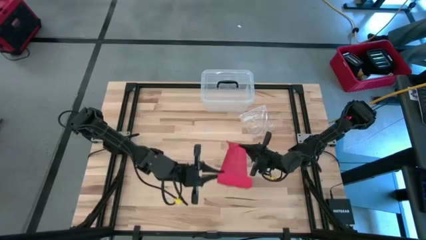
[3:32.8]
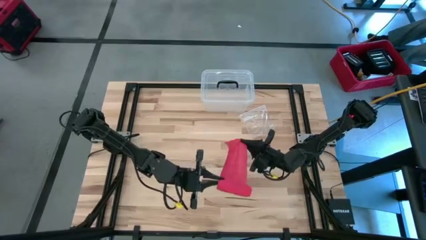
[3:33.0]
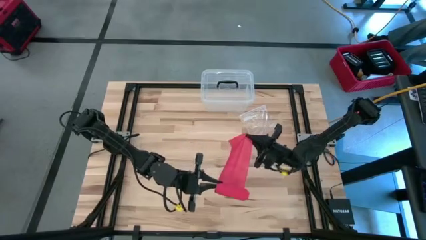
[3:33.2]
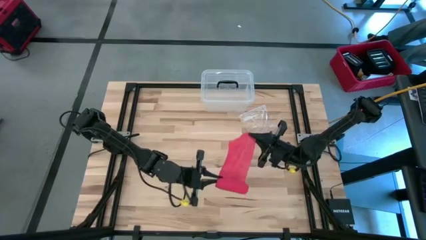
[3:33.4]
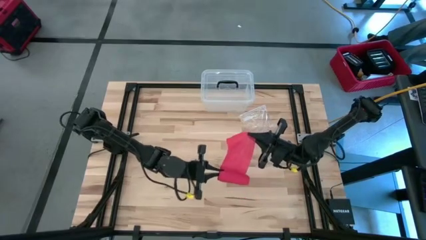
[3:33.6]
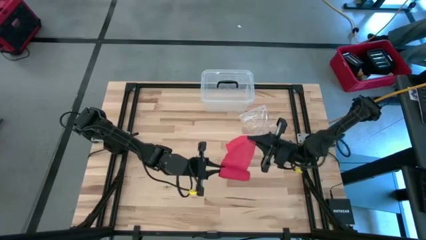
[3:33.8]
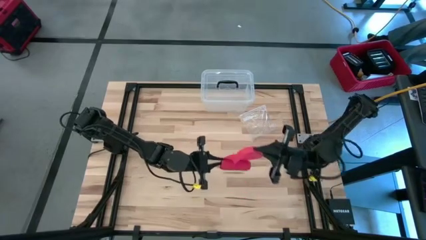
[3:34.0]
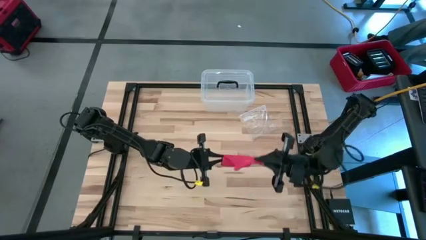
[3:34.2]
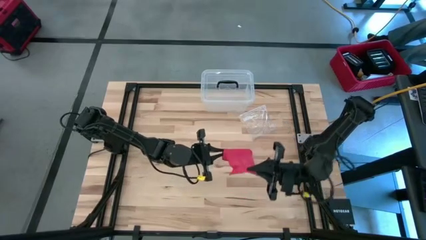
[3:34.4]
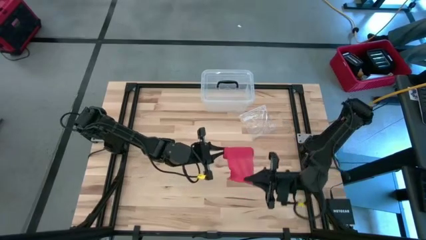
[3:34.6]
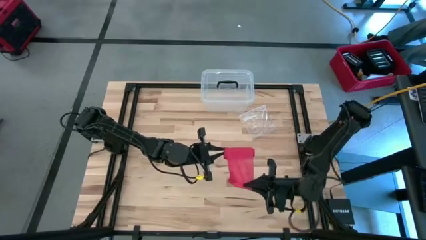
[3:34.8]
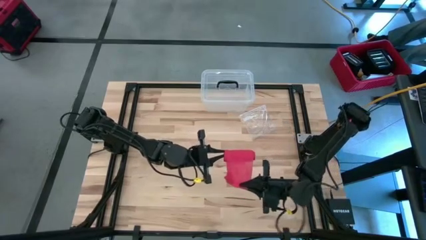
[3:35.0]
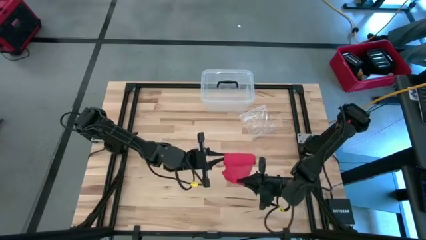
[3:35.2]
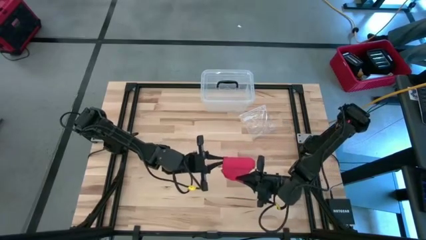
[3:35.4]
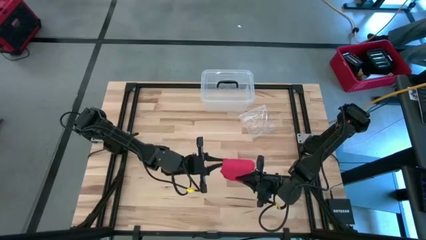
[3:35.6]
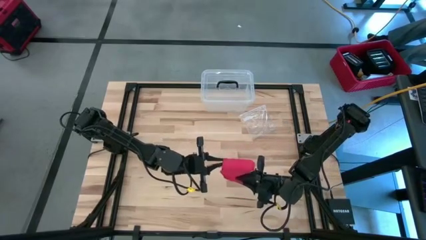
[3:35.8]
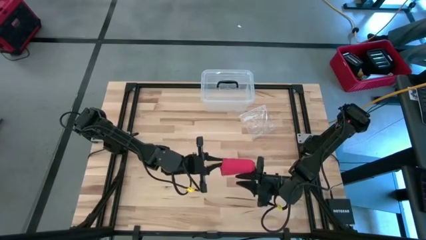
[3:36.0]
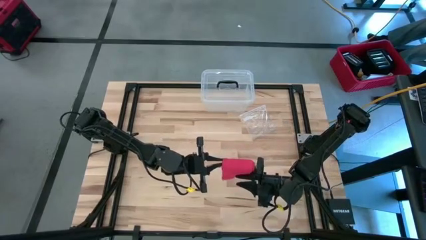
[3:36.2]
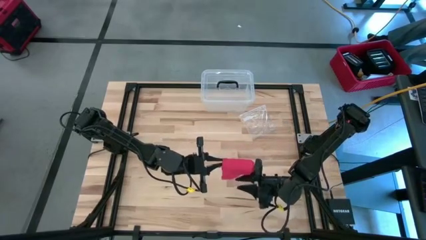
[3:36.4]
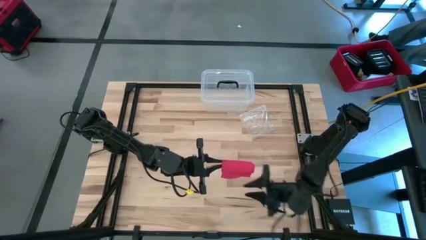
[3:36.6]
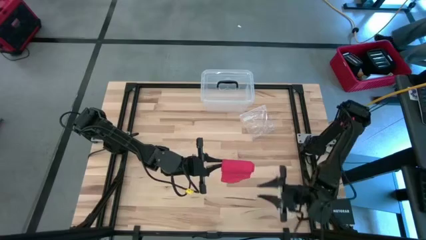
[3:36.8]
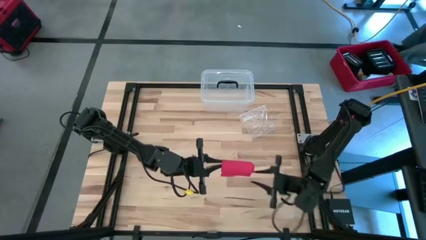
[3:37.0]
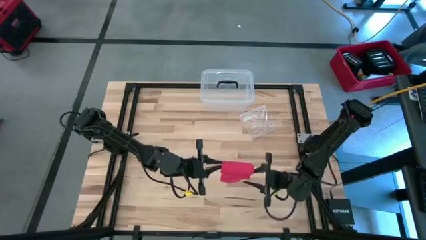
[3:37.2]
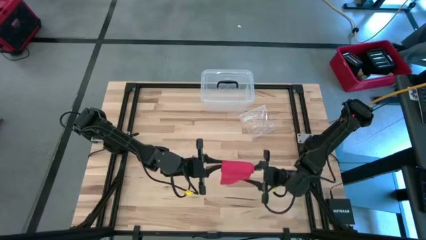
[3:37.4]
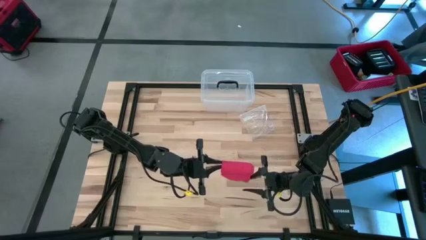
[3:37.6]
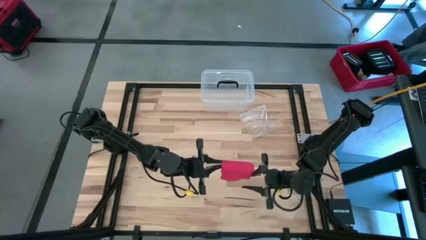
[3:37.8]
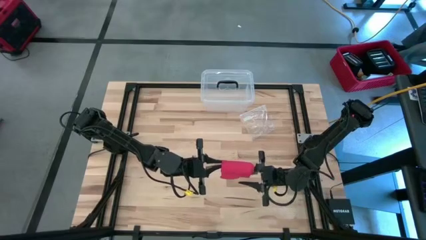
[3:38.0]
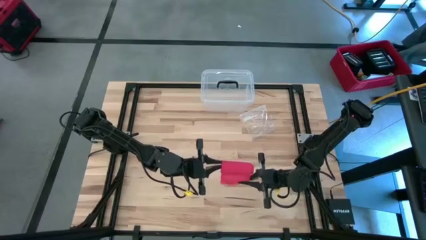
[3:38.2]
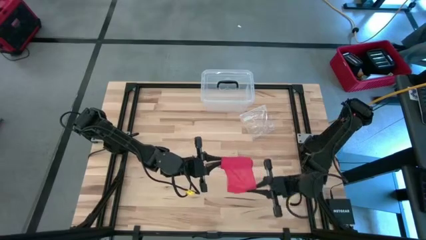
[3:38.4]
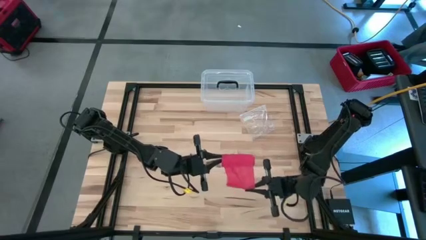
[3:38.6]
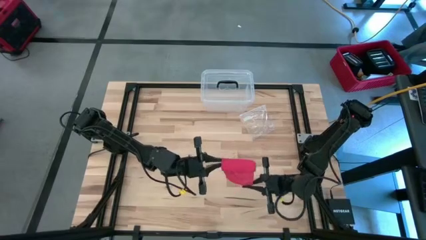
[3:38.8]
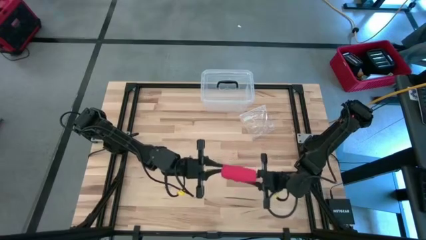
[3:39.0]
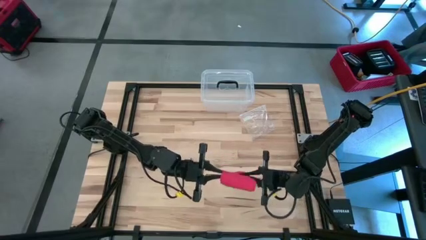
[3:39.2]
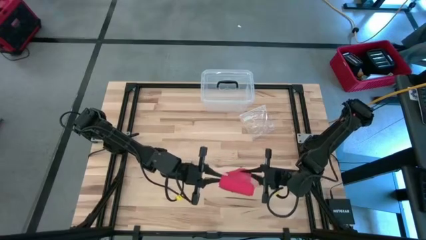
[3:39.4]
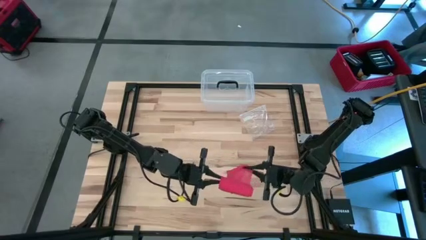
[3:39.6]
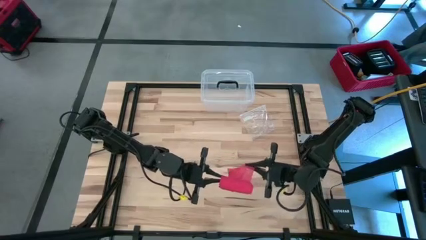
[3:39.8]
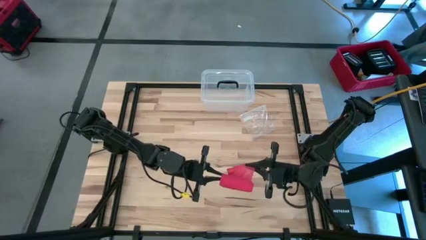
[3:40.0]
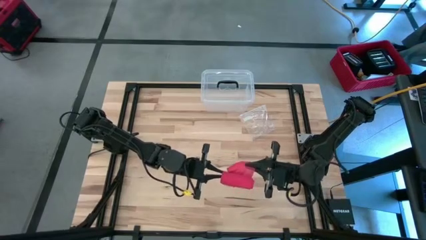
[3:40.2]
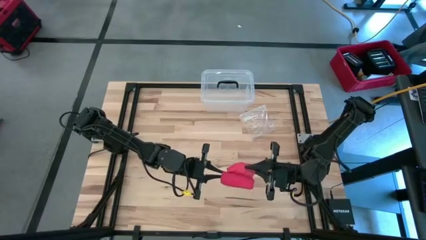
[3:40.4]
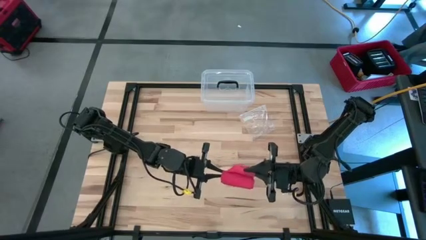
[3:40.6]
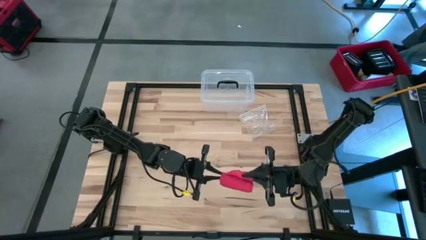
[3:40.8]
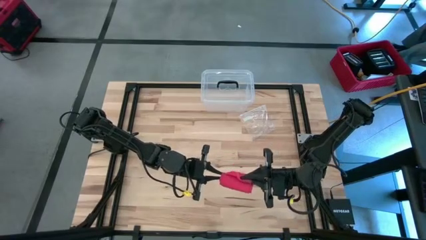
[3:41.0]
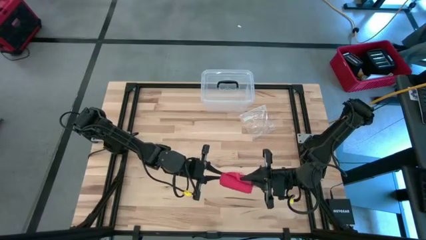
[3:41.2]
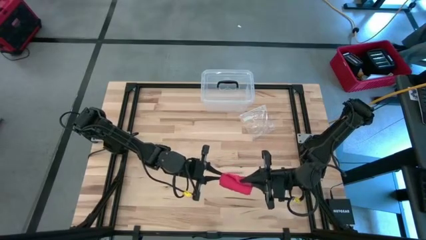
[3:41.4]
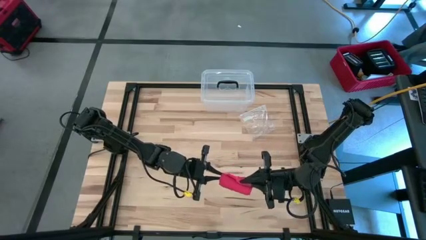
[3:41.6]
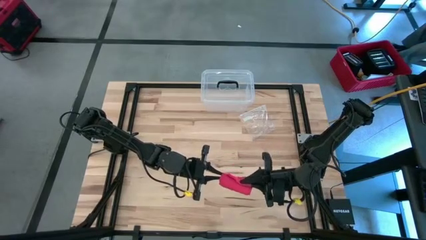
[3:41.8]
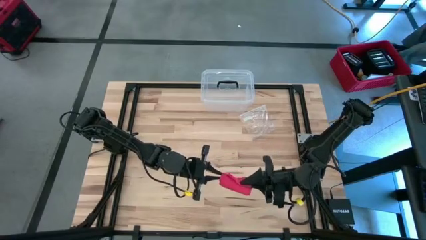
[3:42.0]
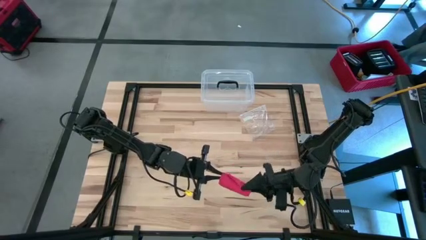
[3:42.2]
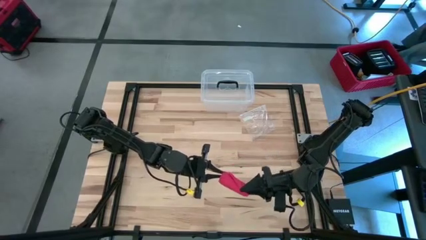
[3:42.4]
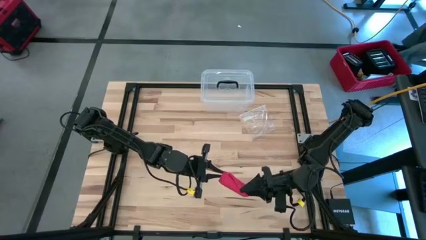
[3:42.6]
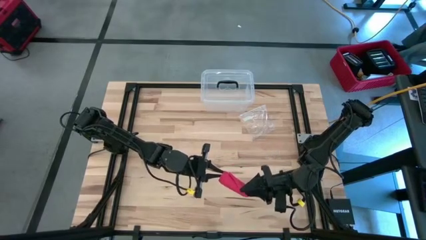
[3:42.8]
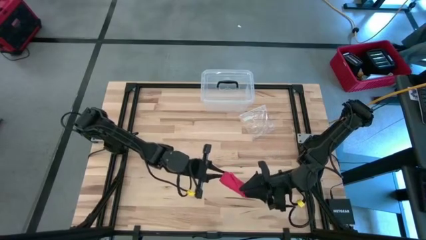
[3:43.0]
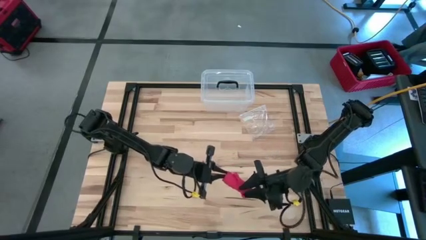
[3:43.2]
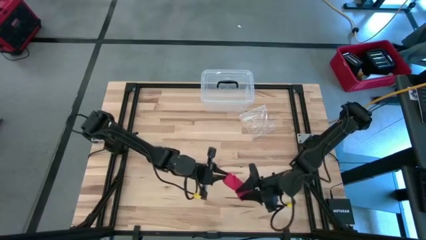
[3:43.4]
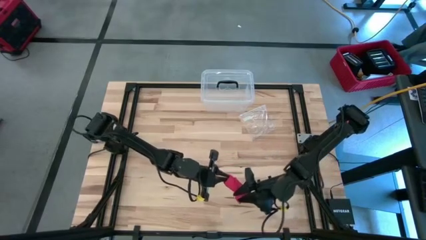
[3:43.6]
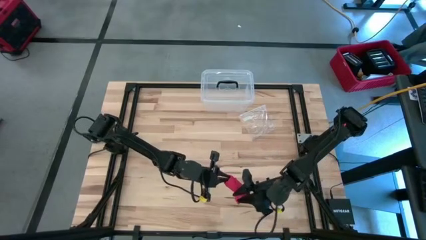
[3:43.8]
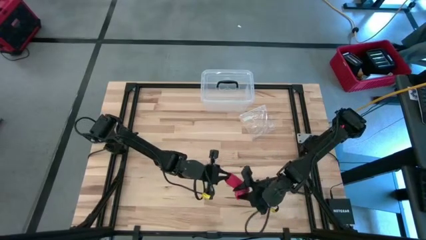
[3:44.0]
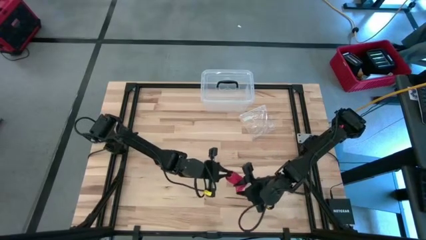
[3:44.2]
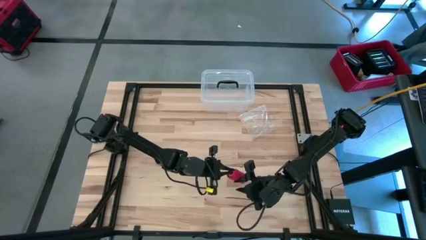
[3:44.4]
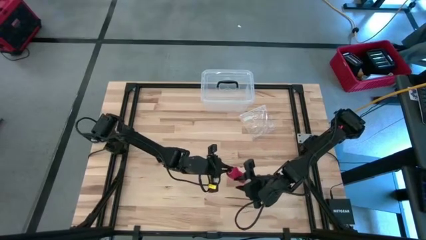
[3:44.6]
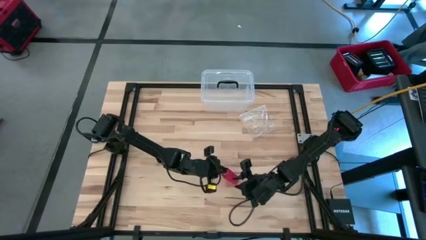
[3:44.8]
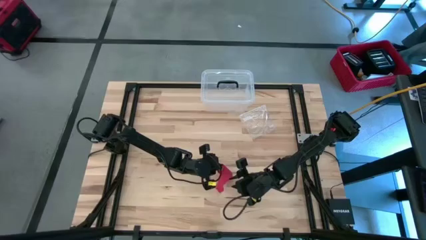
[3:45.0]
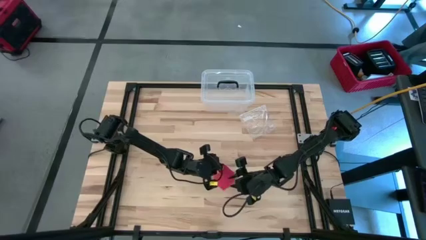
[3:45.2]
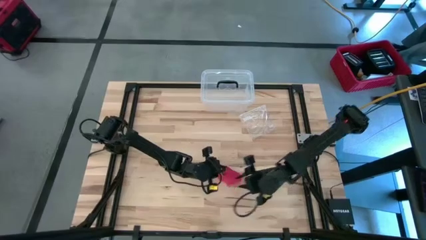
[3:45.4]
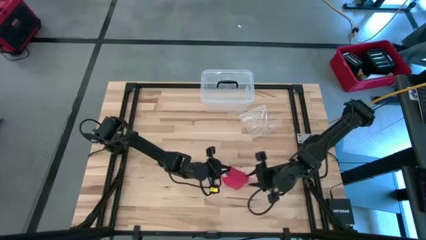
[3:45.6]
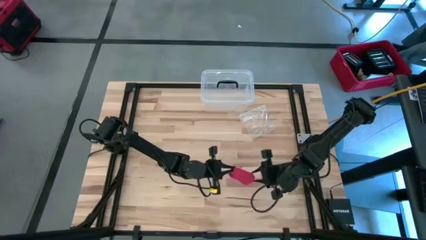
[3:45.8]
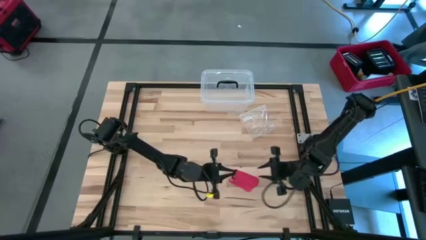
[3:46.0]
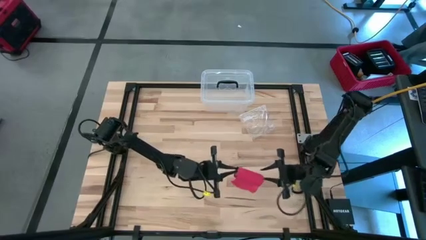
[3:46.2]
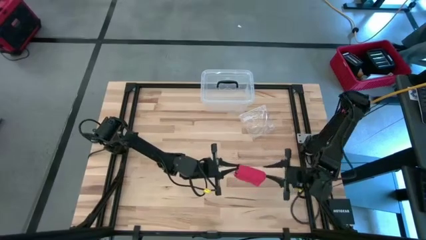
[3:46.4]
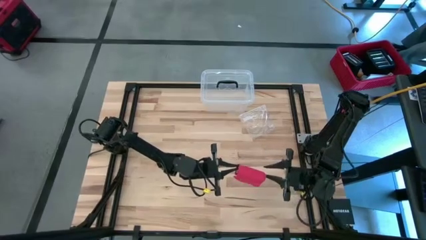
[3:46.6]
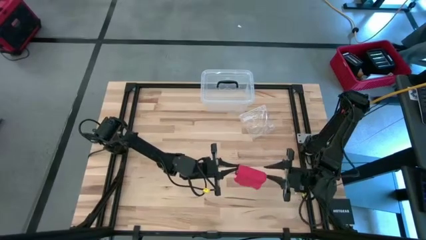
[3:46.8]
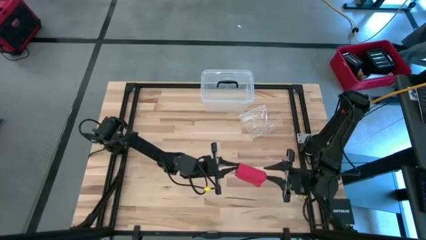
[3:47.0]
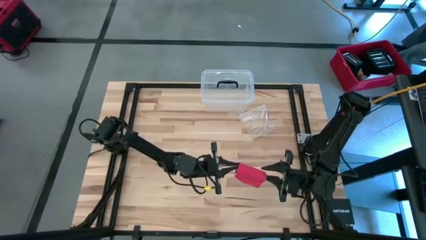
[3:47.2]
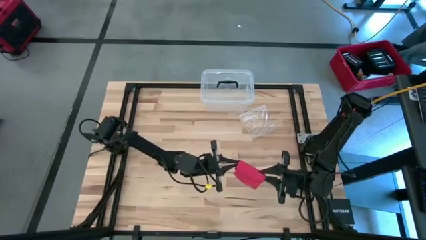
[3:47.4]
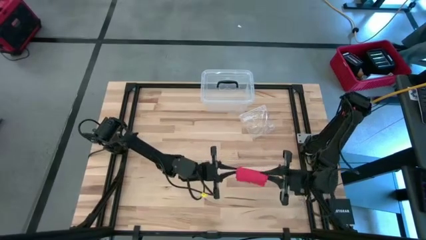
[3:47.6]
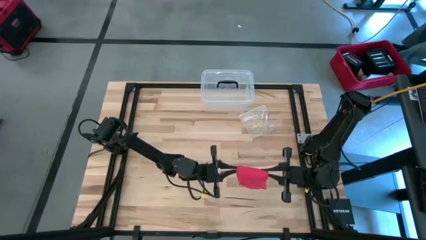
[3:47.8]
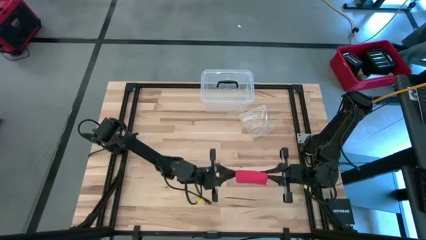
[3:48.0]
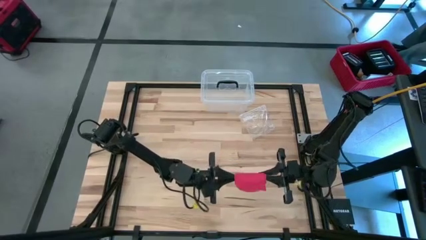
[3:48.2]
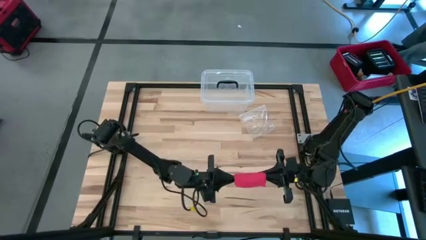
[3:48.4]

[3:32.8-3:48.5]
Task: Roll bandage
Roll the red bandage

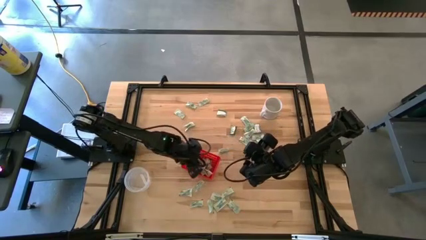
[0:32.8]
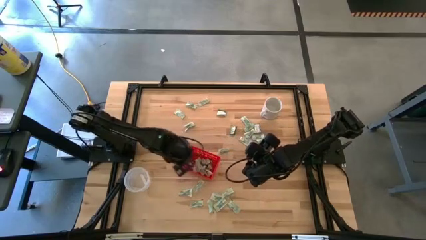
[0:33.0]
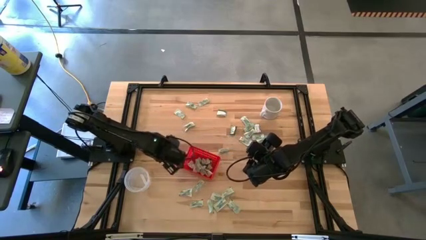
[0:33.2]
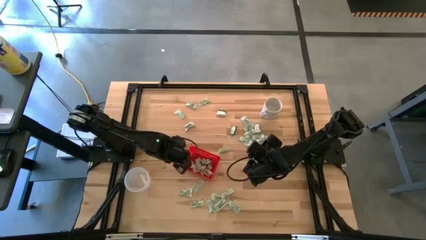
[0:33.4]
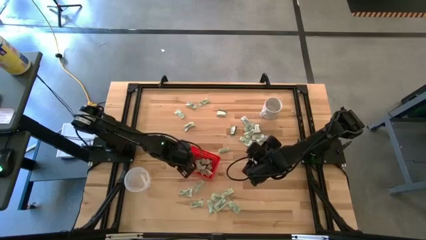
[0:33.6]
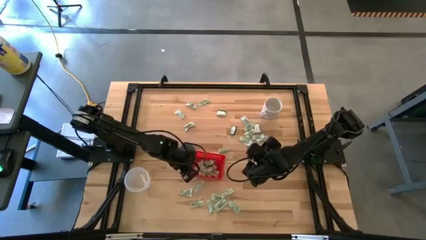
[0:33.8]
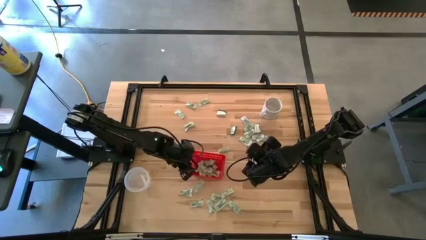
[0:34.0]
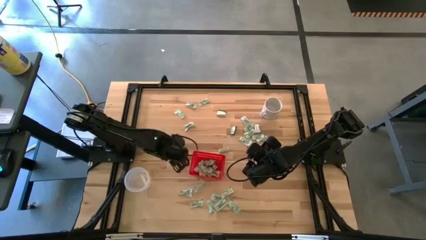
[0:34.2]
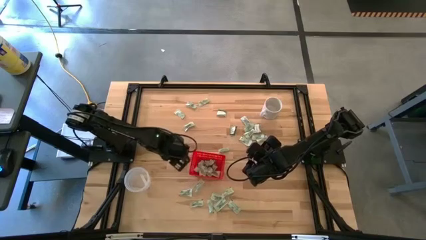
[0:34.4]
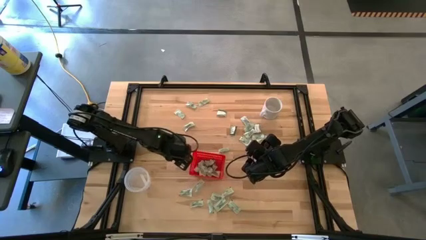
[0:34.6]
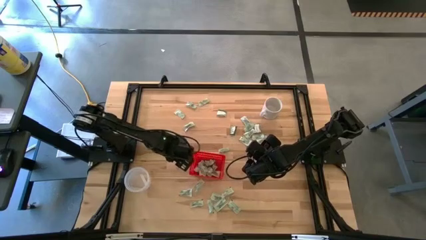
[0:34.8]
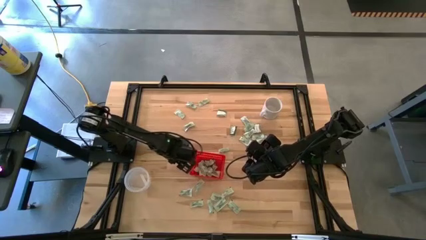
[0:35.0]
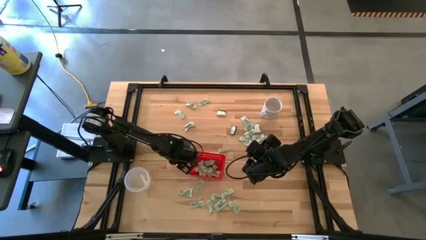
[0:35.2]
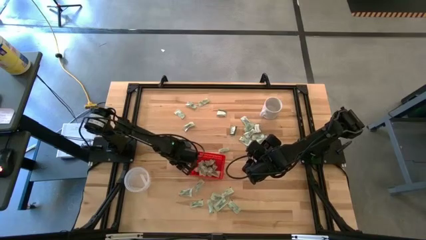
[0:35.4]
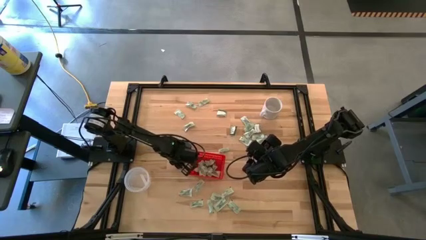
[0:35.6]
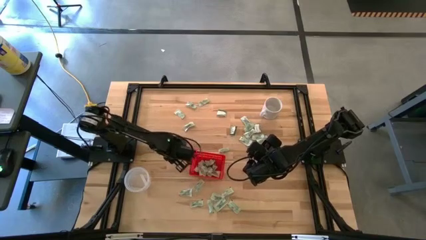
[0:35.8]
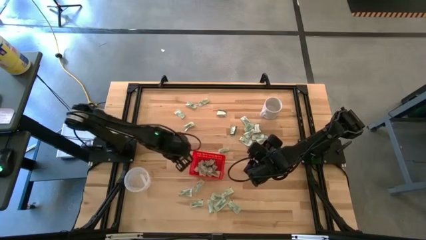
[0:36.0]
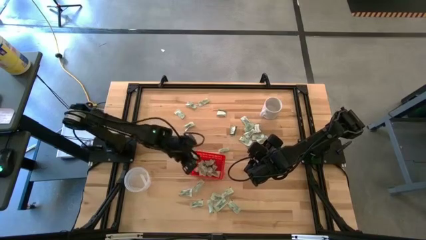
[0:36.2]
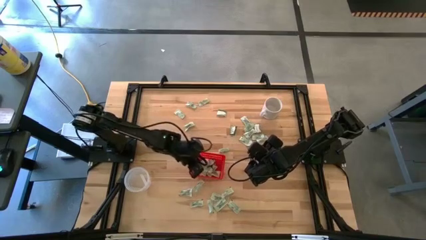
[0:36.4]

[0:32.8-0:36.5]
Task: Pick and place Stevia / Truvia into bins
Put the green stevia packet into the red basket
